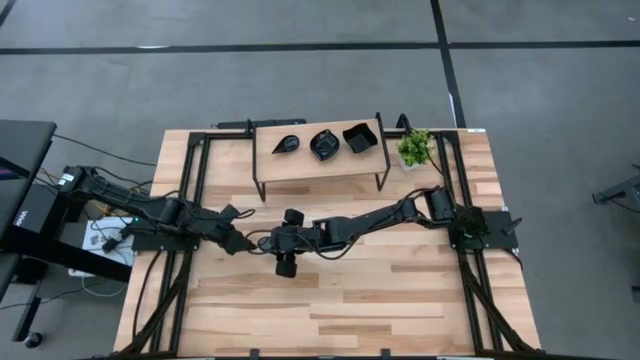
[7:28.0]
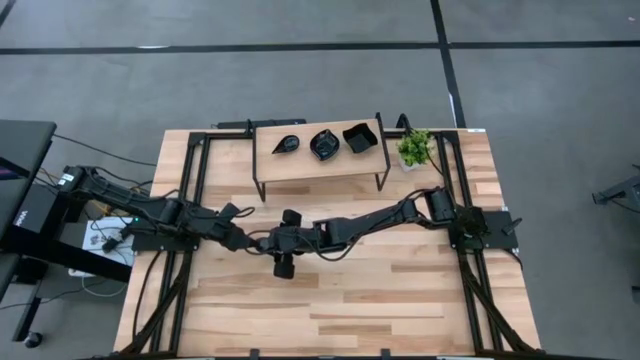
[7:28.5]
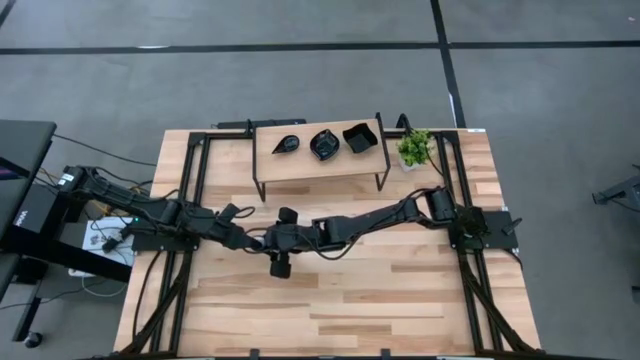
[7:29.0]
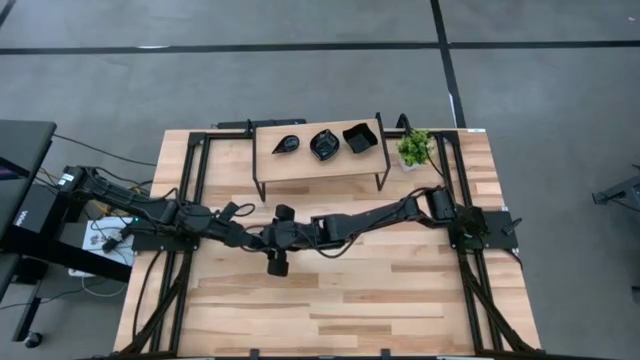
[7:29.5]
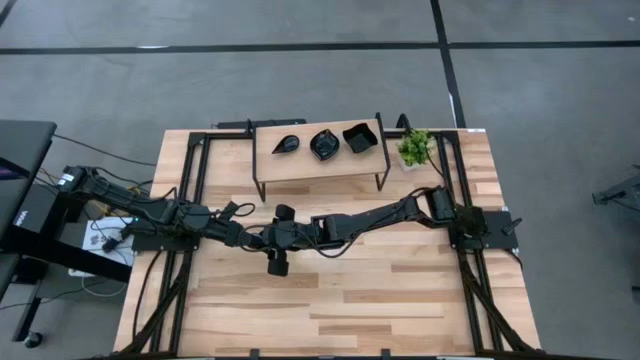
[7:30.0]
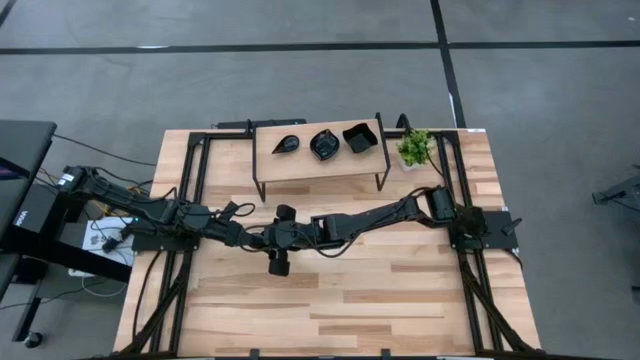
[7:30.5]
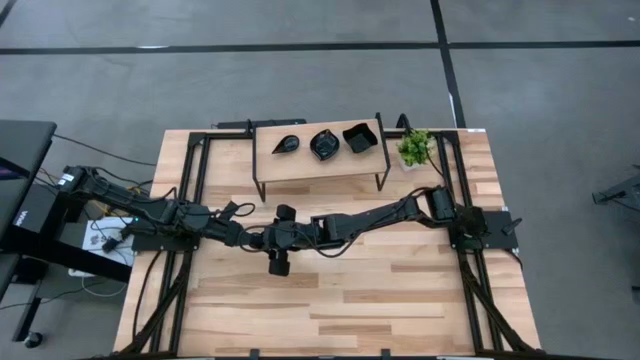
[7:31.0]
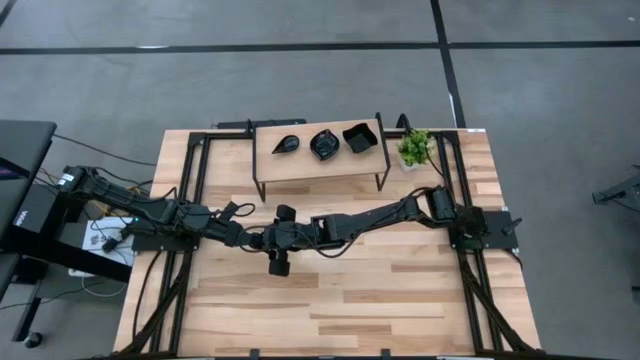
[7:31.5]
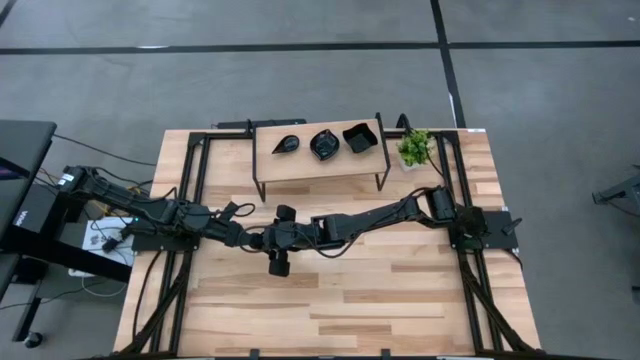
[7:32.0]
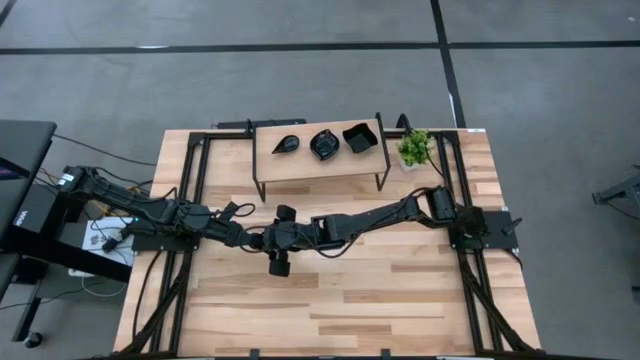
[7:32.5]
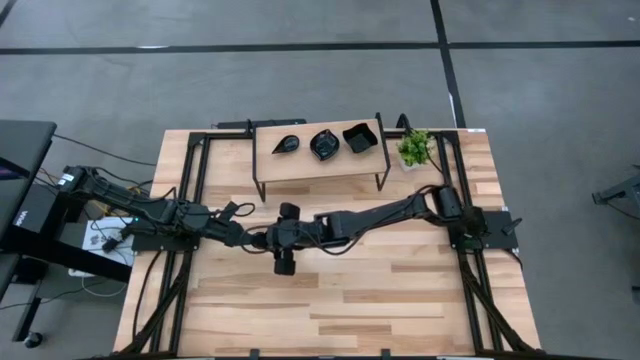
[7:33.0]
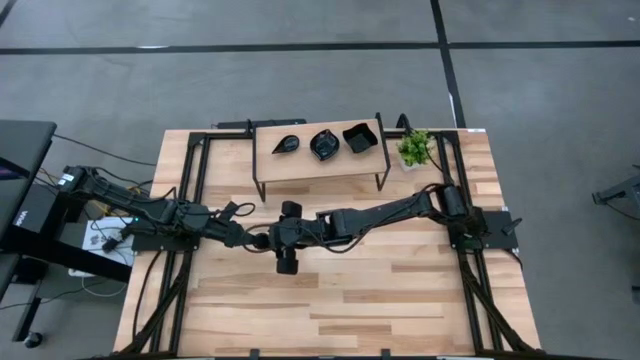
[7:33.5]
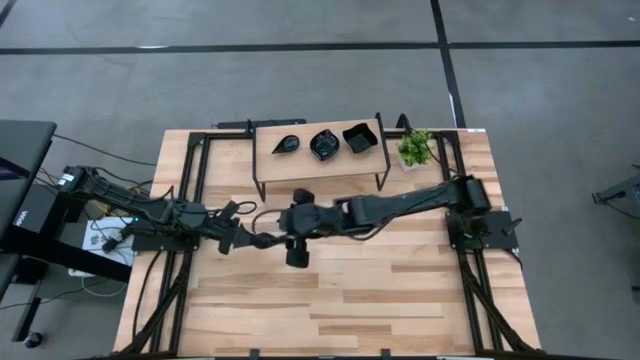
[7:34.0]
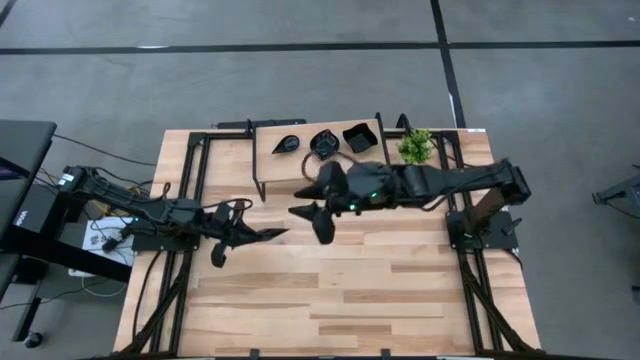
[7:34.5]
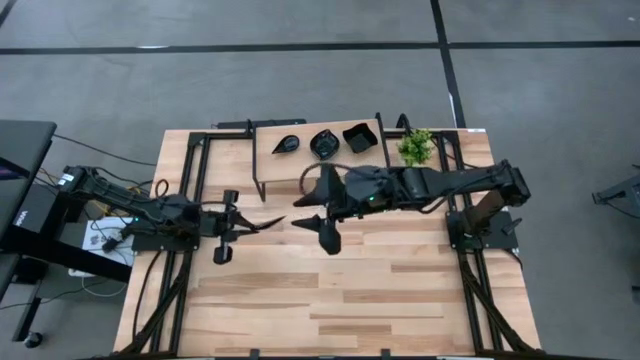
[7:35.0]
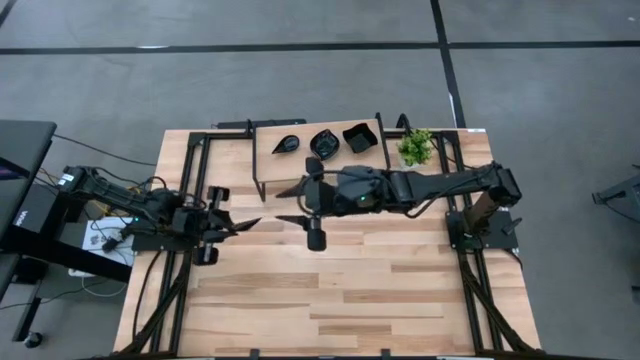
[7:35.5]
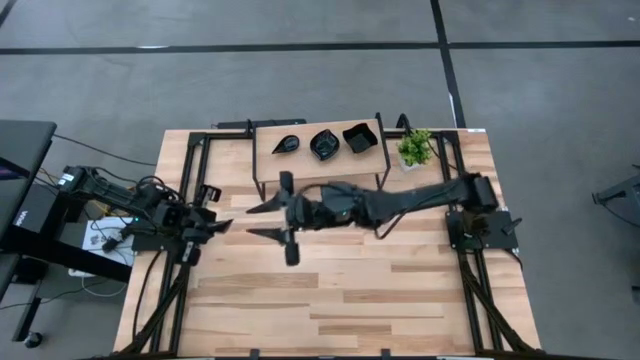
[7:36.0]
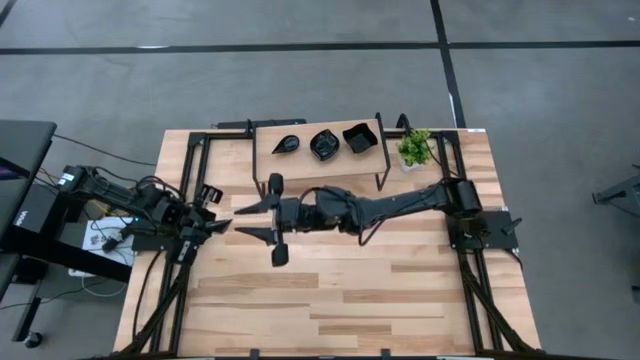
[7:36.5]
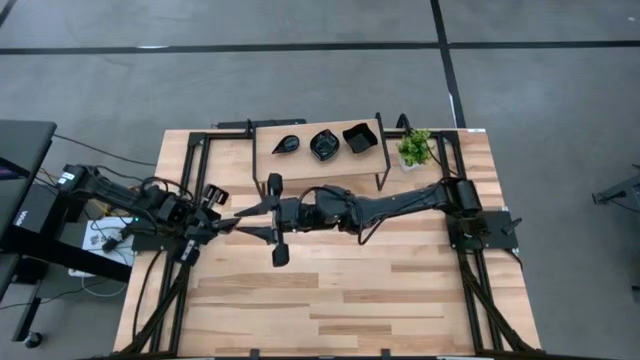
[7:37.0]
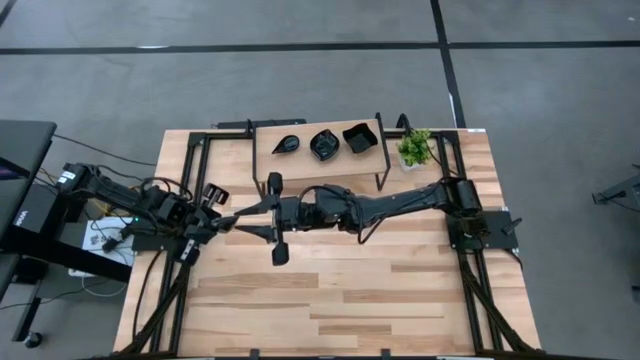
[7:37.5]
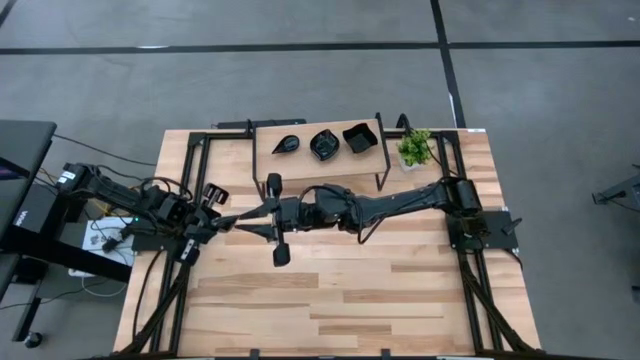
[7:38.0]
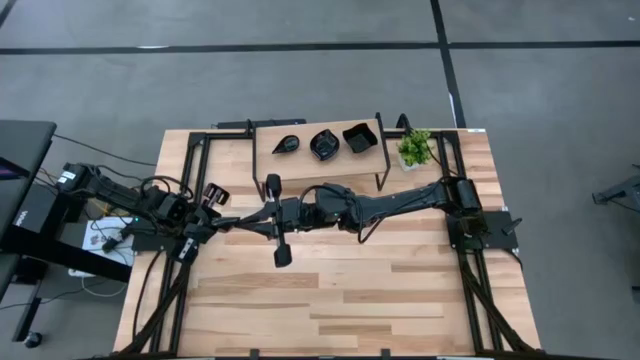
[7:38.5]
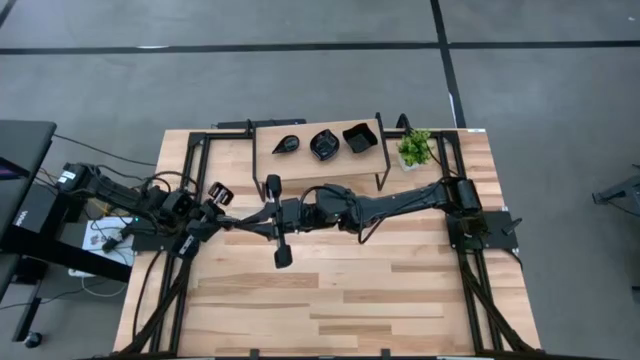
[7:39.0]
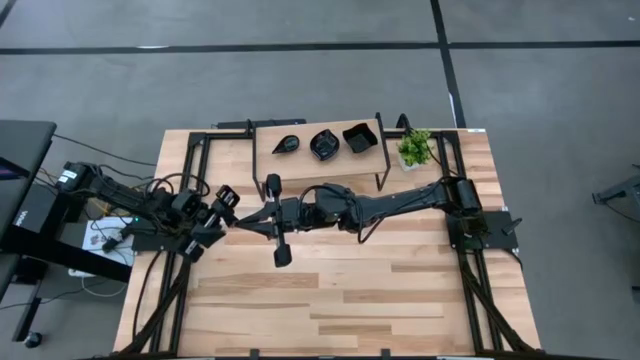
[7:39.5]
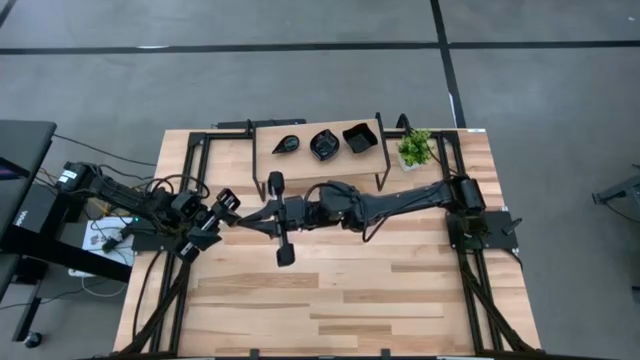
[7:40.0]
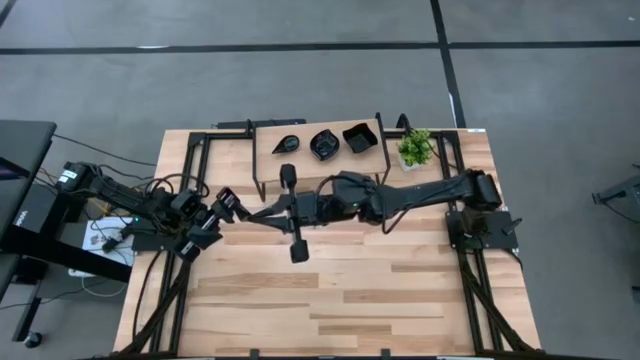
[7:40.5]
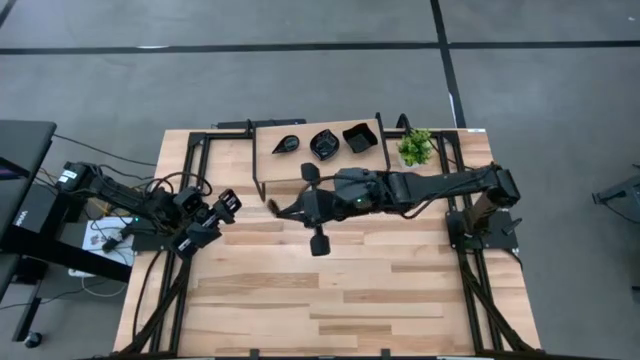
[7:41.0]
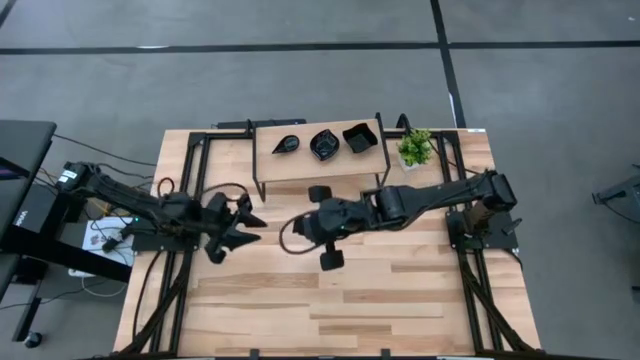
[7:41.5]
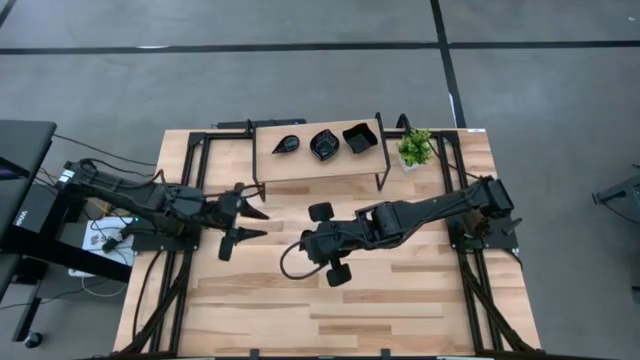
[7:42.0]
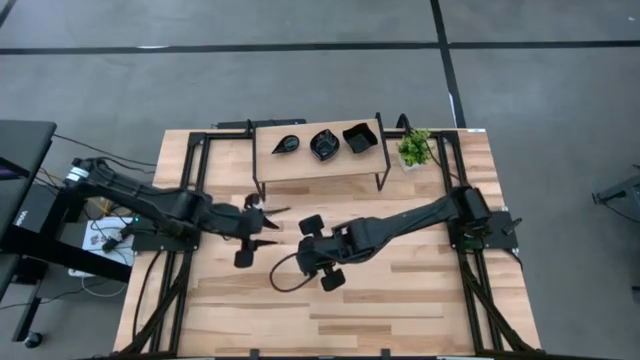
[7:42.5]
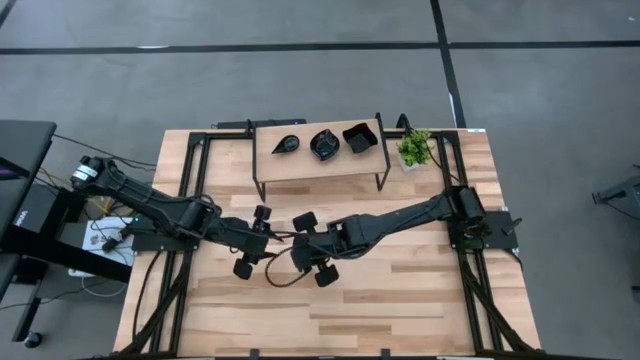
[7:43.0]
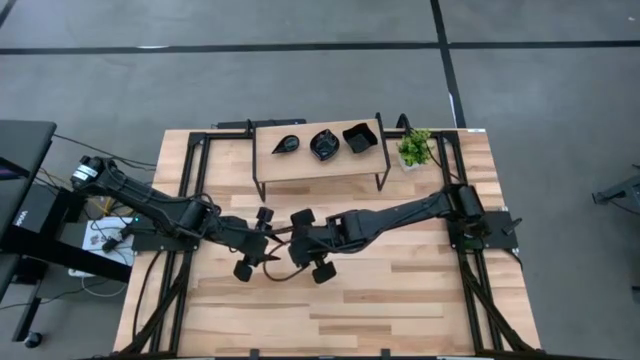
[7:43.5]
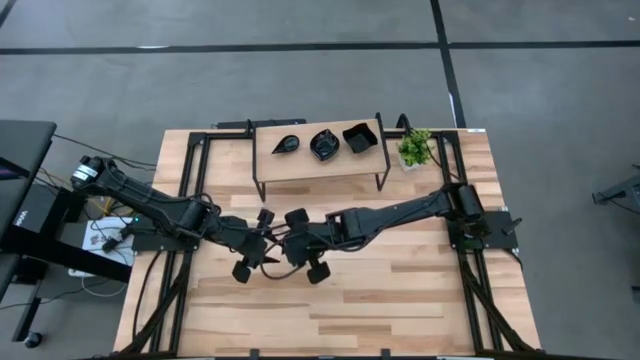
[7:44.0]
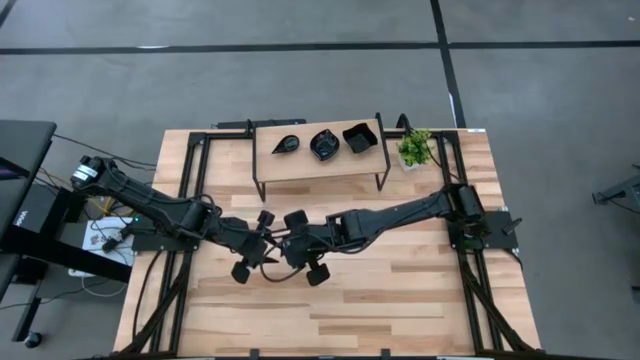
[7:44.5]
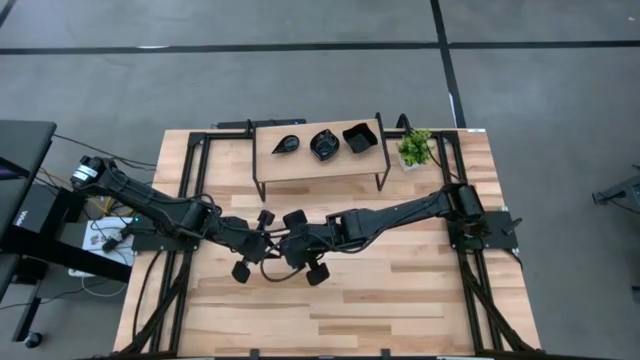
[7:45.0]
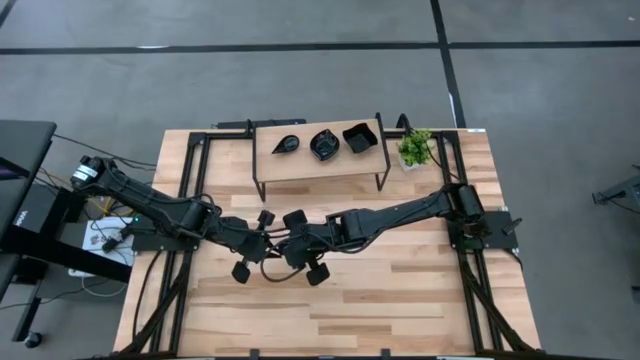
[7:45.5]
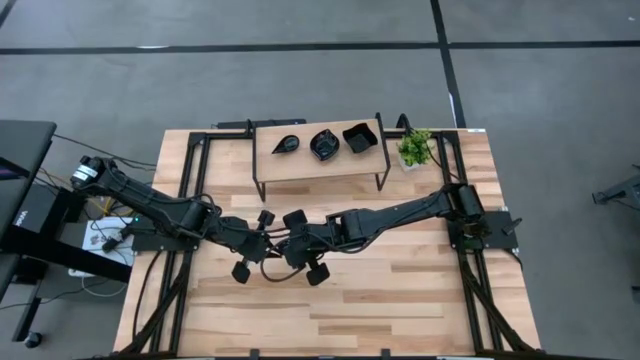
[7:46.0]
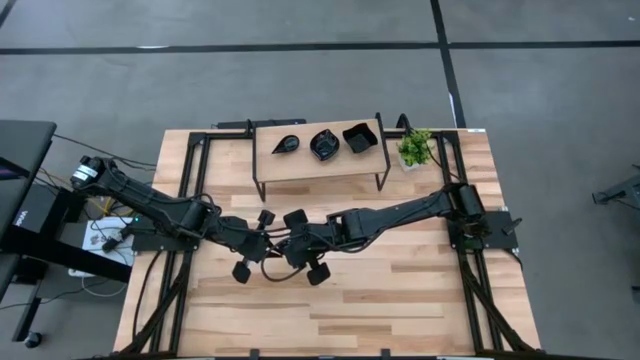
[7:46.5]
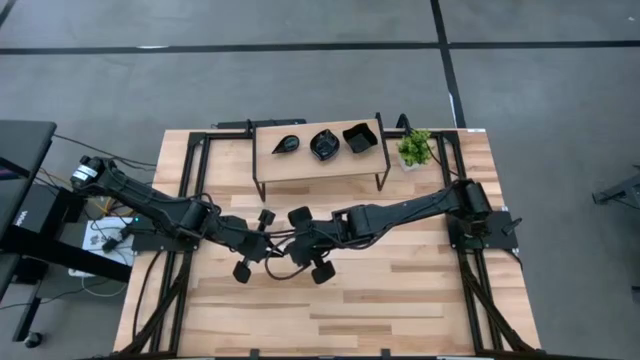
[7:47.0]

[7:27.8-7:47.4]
Task: Pick & Place Mini shaped plates
Stack the black drop shaped plate on the black drop shaped plate on the shelf
